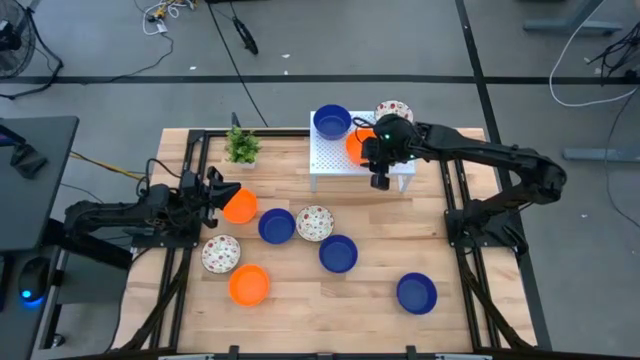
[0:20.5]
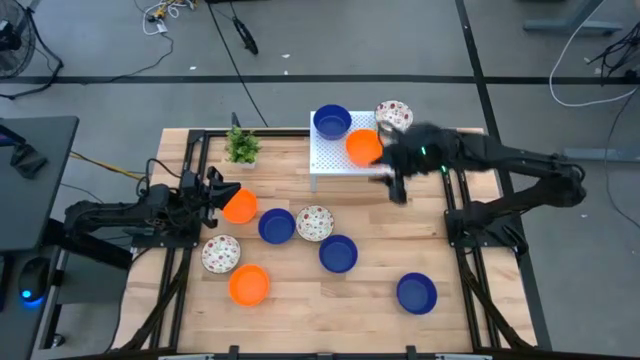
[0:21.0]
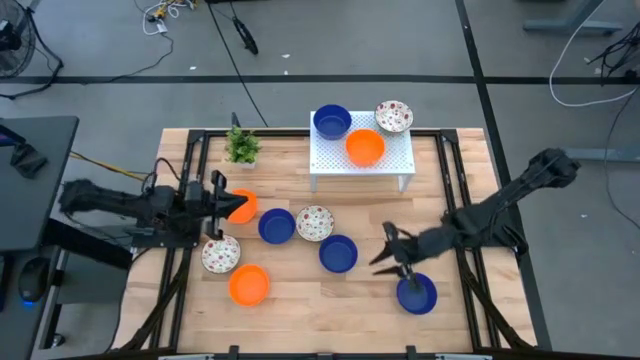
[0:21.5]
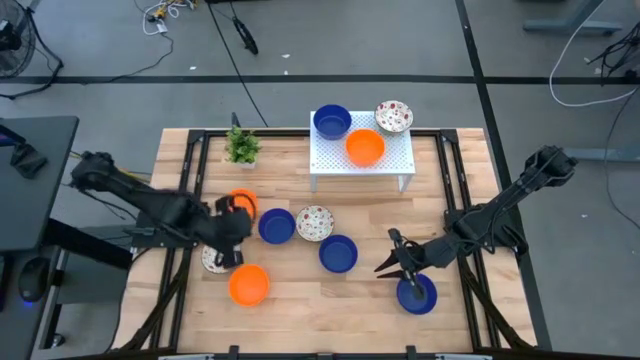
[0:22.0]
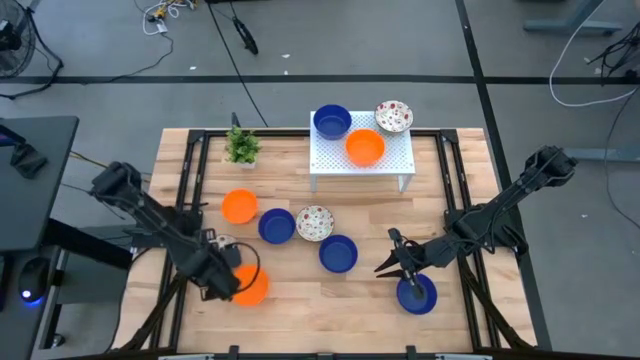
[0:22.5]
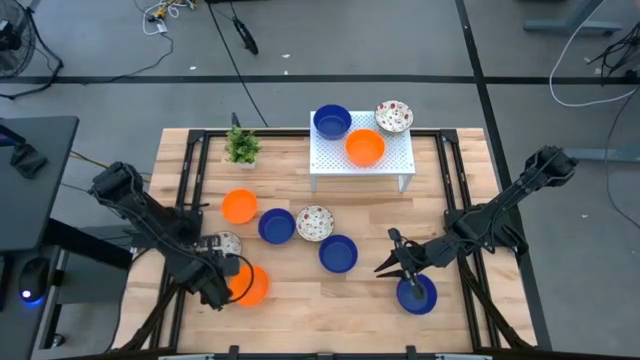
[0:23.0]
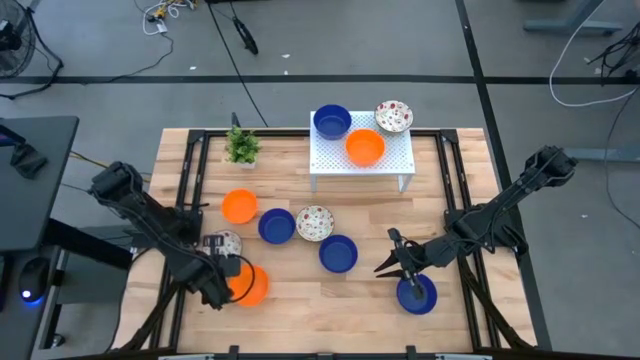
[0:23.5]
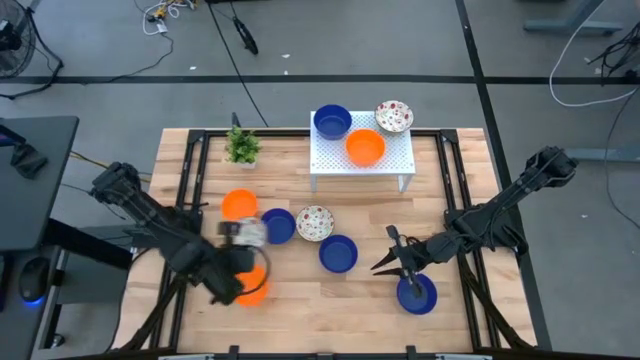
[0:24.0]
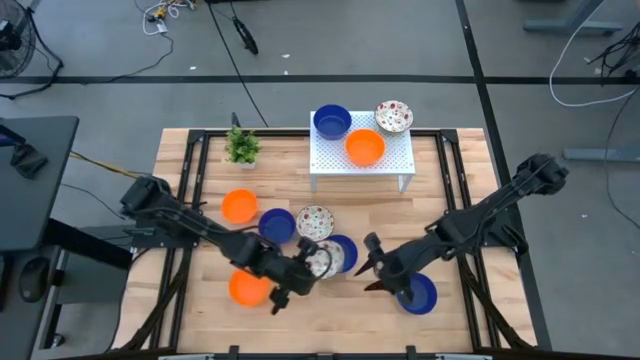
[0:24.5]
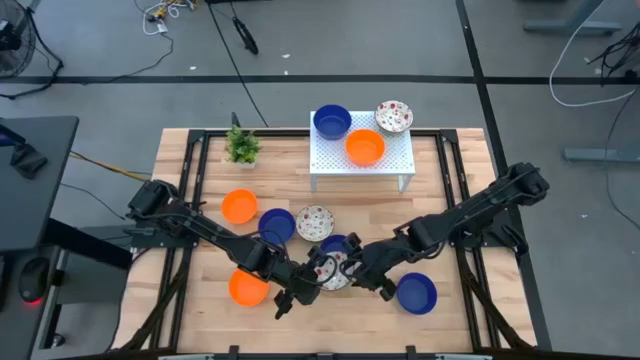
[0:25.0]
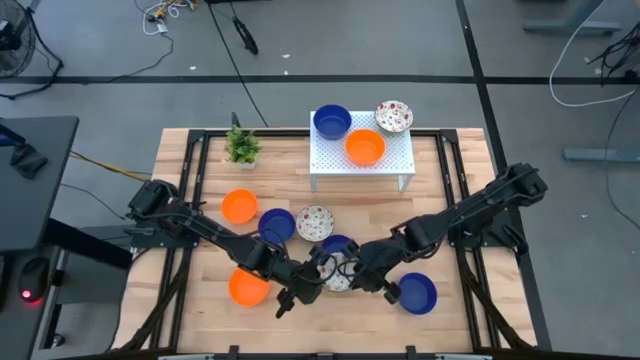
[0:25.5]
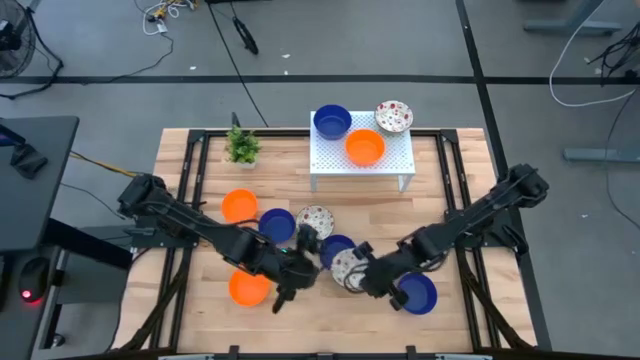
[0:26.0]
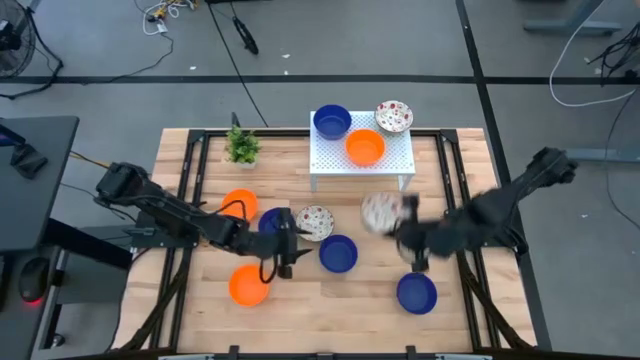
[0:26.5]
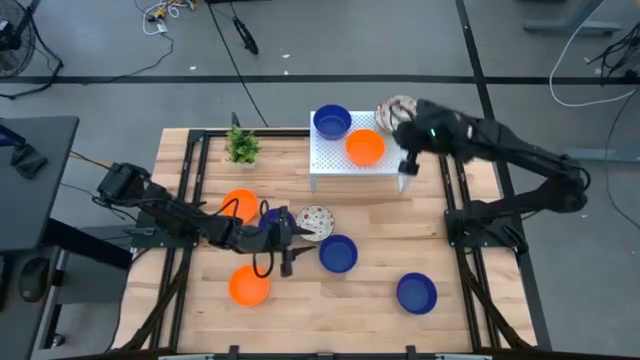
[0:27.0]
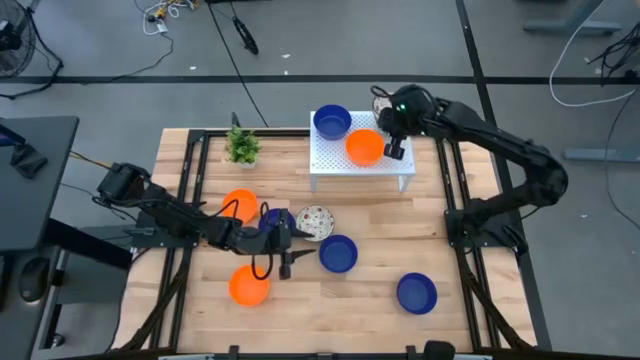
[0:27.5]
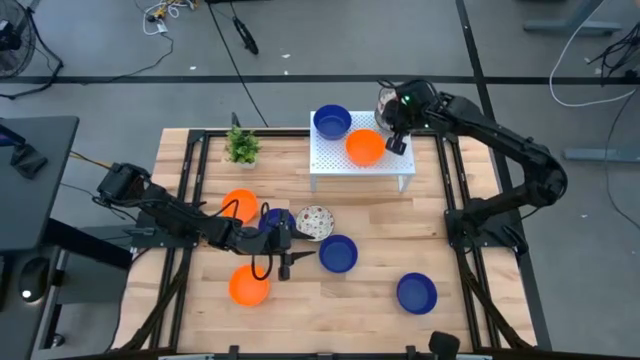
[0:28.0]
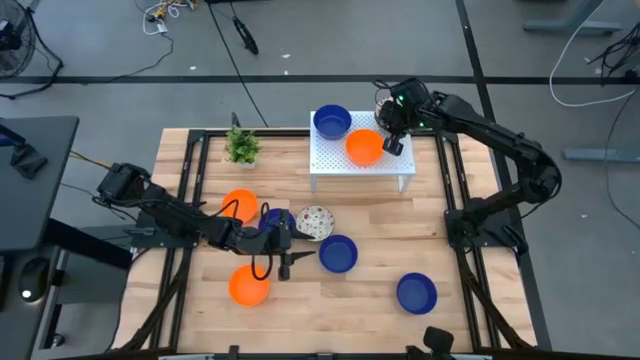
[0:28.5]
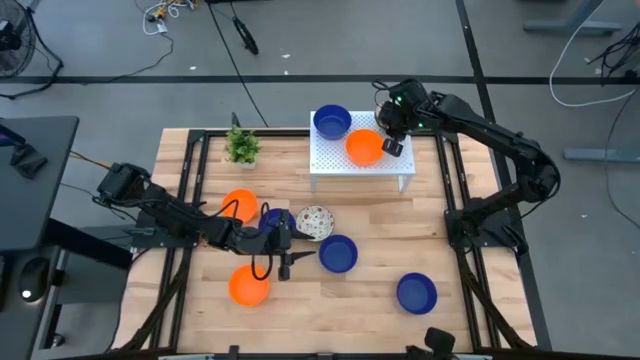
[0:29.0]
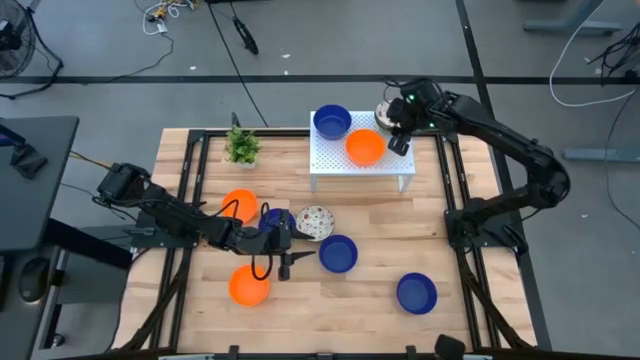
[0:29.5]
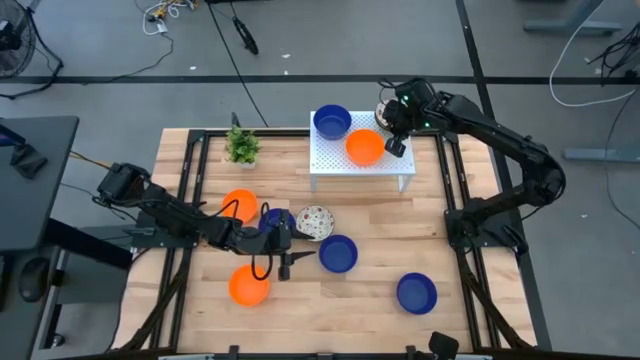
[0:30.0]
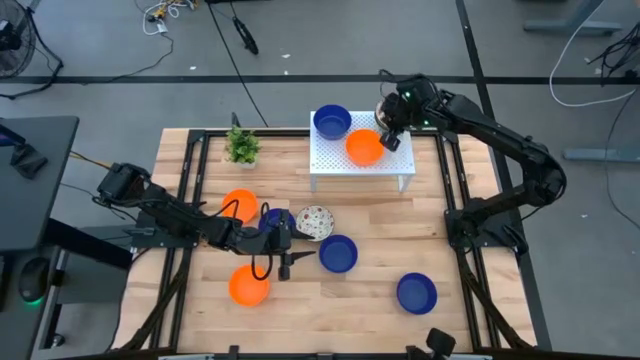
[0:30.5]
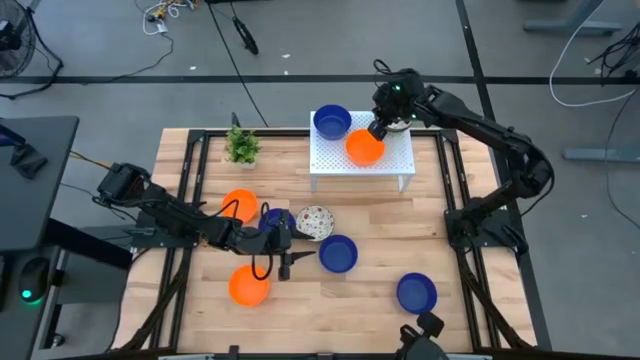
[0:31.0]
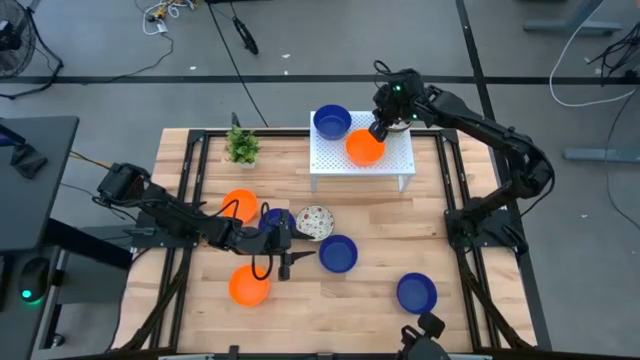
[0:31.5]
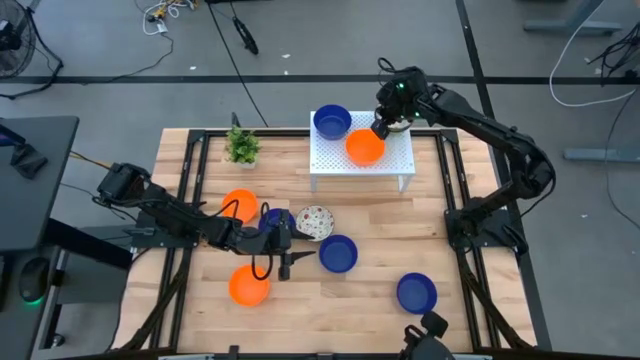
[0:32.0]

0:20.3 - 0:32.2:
Task: Pick & Place Mini bowls
Stack the white red patterned bowl on top of the other white red patterned bowl on the shelf

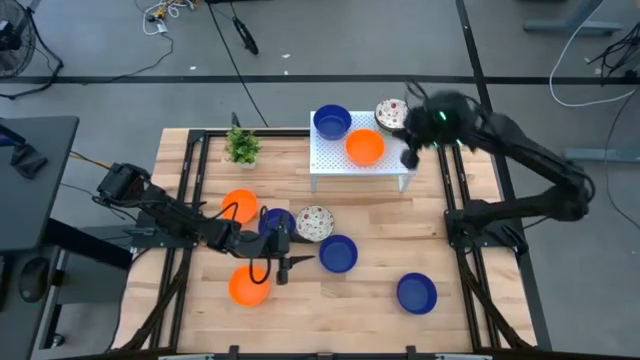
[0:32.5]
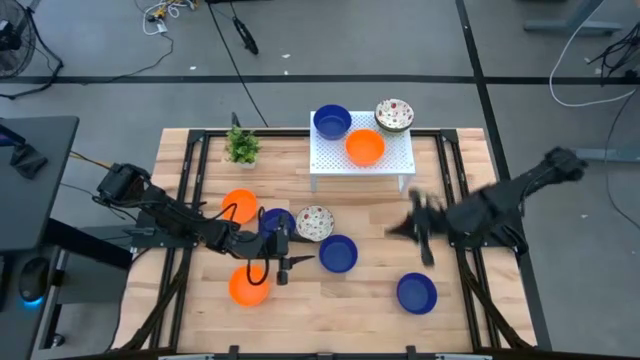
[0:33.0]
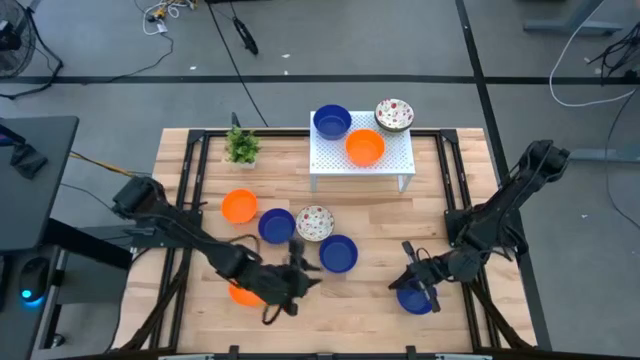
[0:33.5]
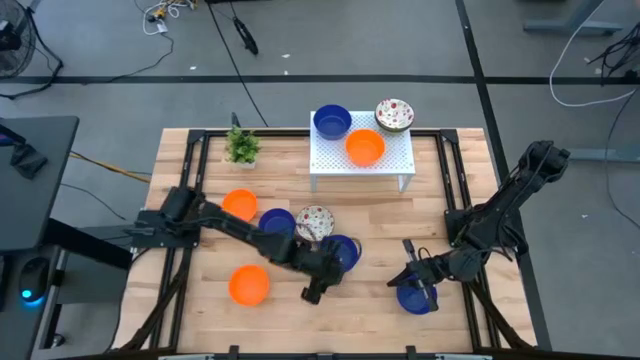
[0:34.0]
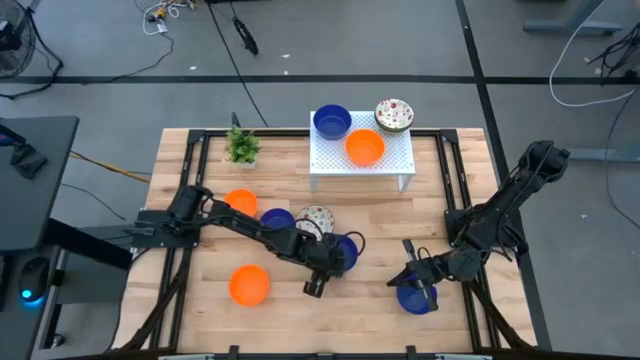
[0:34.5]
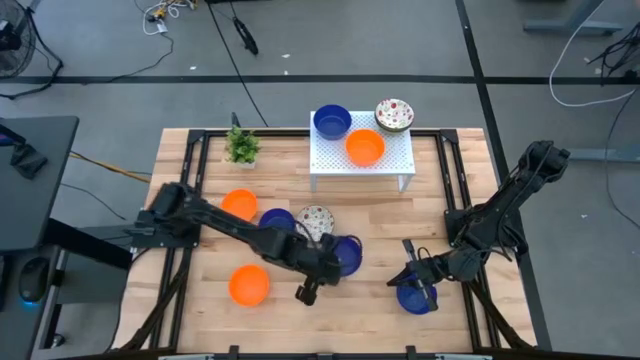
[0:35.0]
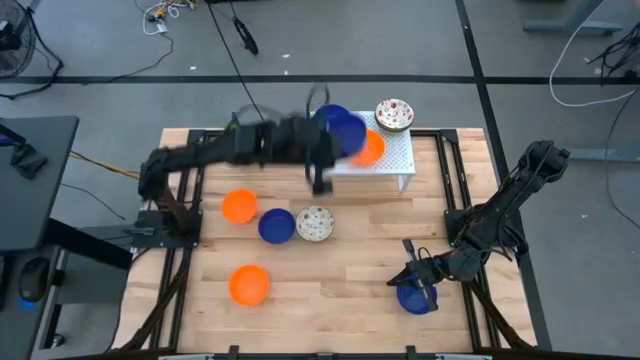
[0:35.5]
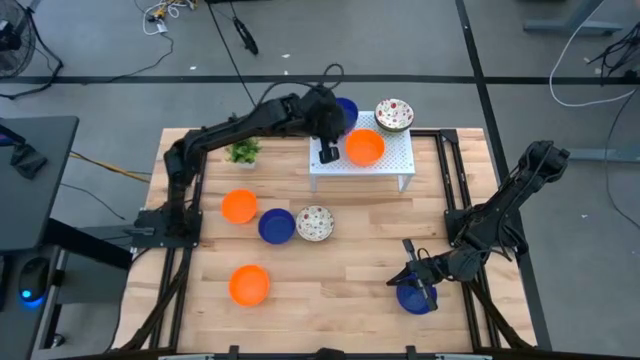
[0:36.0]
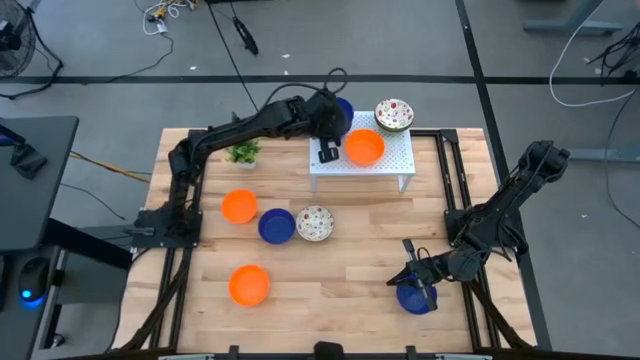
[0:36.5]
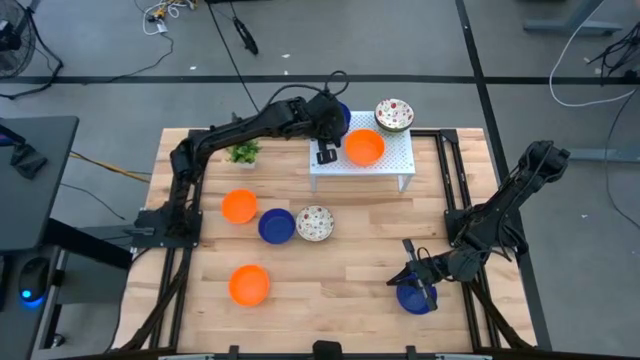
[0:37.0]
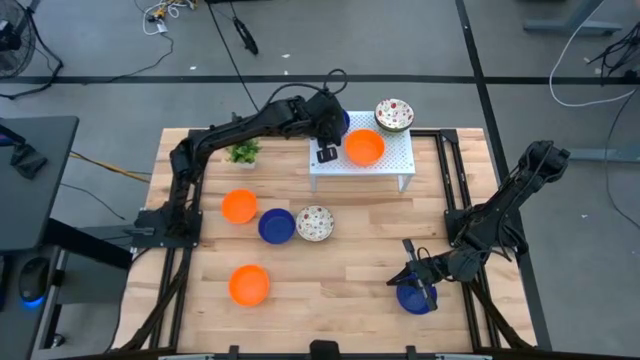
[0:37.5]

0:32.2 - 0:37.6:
Stack the blue bowl on top of the other blue bowl on the shelf

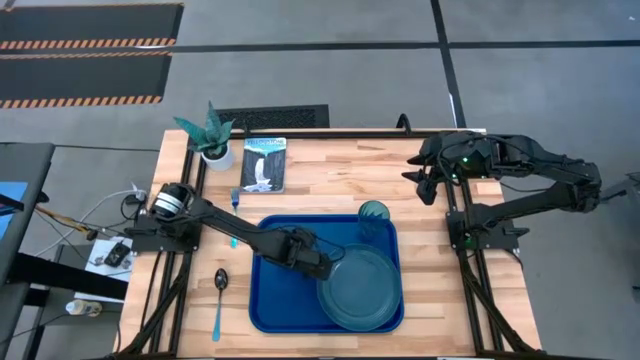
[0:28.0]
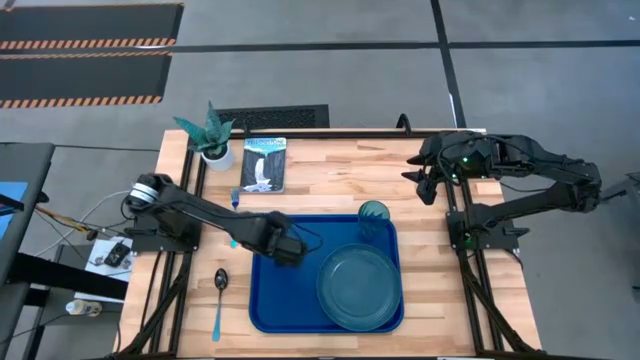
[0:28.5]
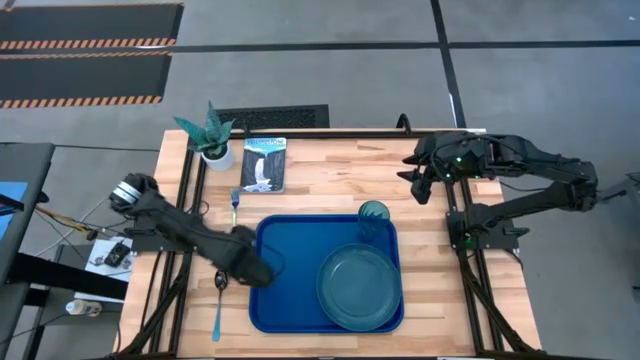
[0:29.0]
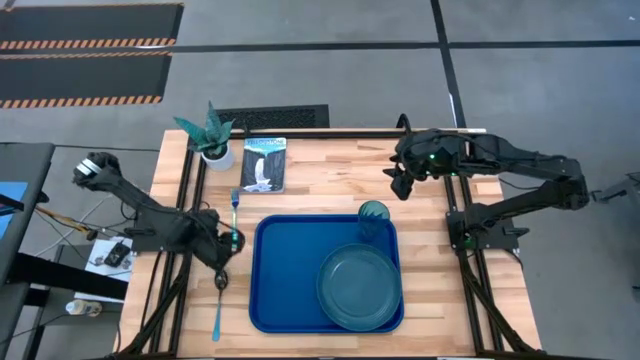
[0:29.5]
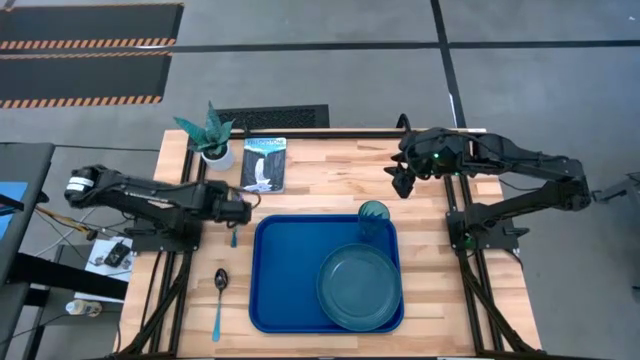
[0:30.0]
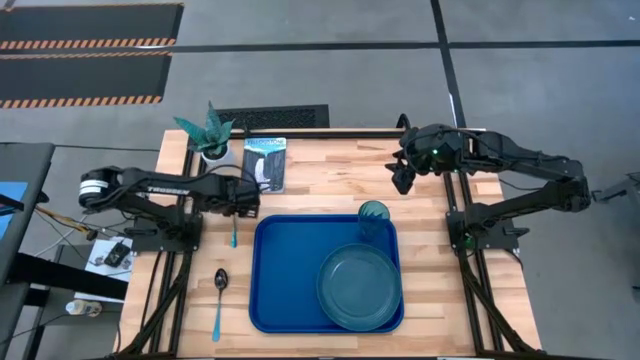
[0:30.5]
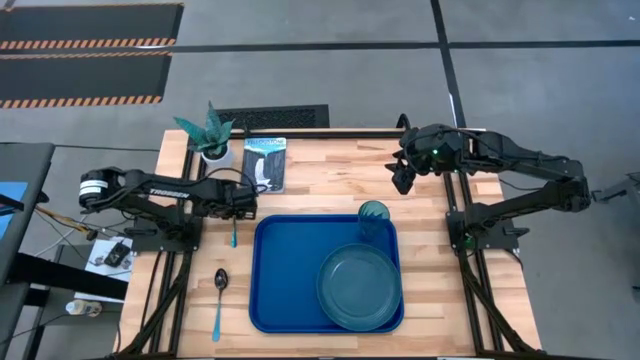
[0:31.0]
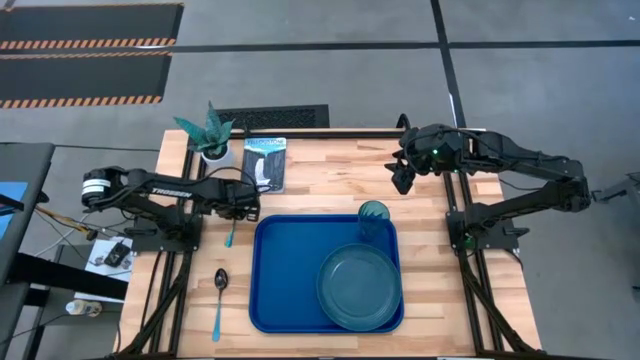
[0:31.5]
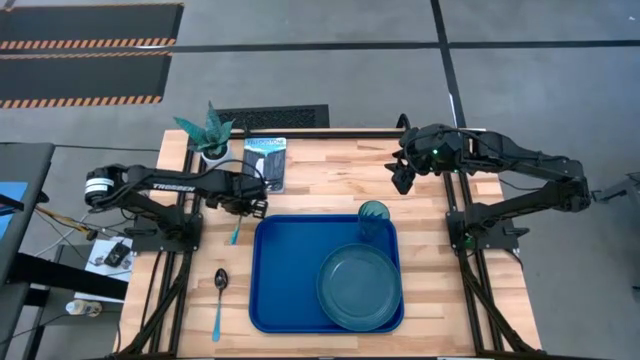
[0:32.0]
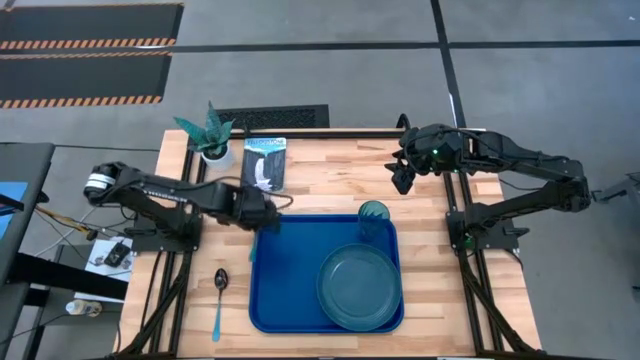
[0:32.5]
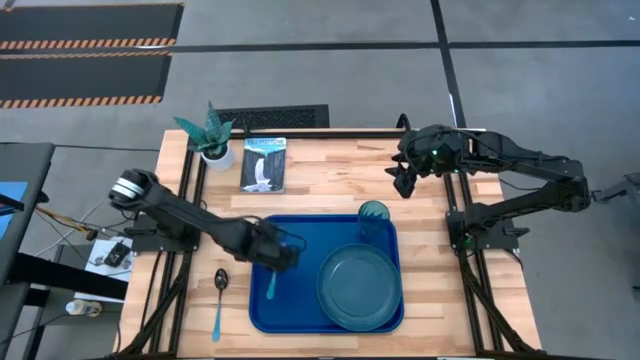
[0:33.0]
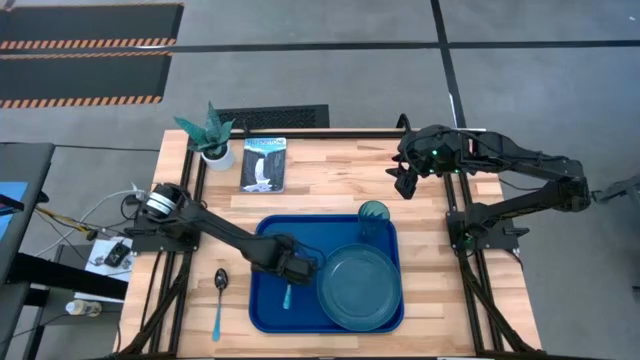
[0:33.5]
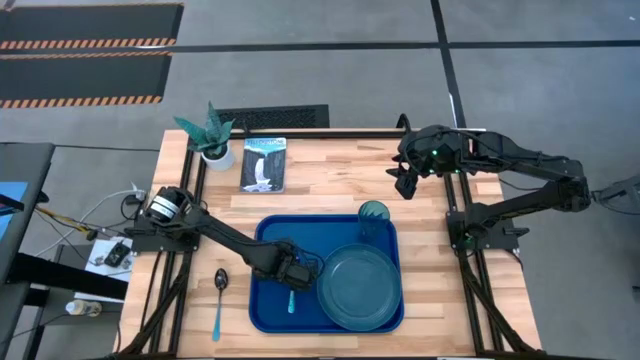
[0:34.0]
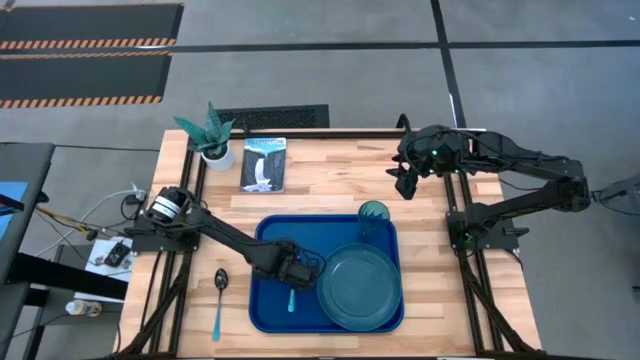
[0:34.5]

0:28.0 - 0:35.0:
Task: Pick and place plate/cup/fork/spoon on tray
Put the blue fork on the blue tray to the left side of the blue plate
